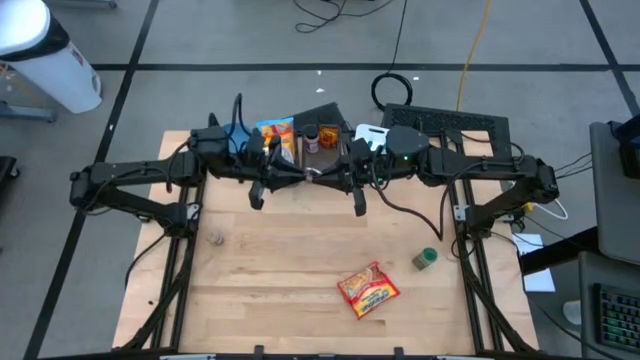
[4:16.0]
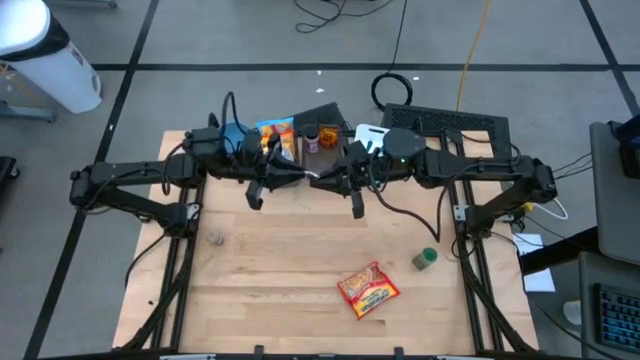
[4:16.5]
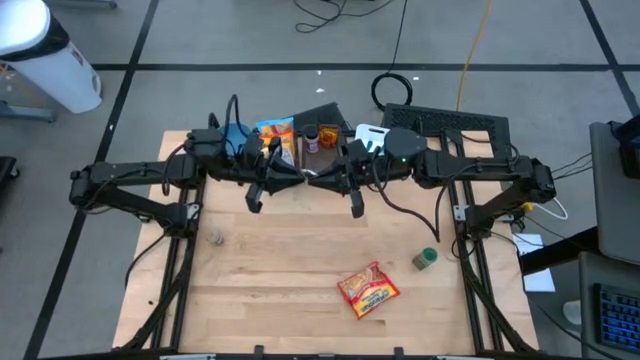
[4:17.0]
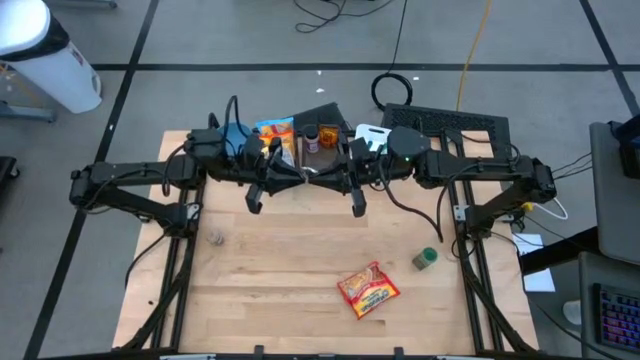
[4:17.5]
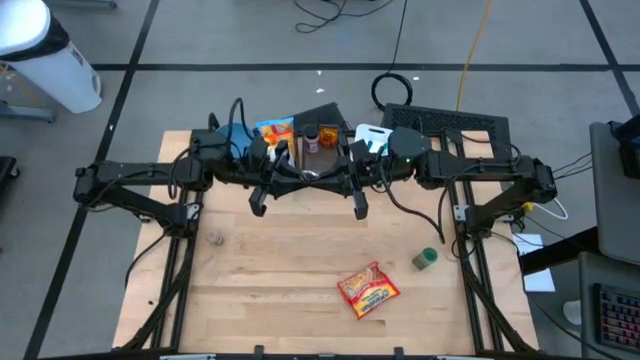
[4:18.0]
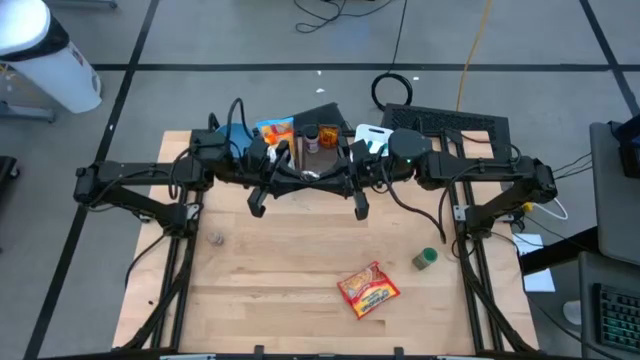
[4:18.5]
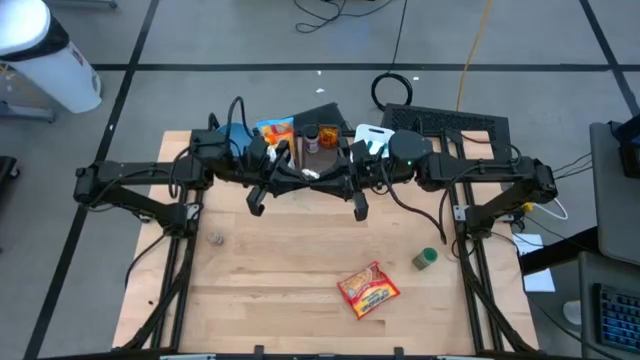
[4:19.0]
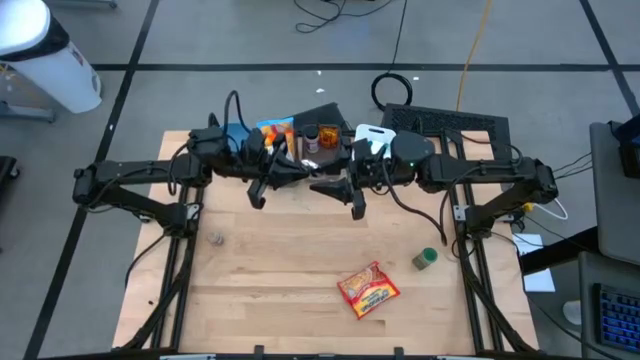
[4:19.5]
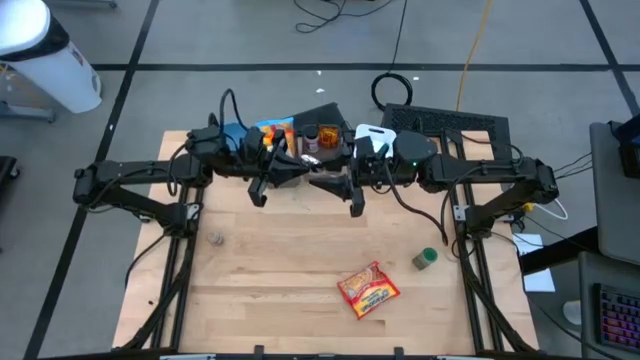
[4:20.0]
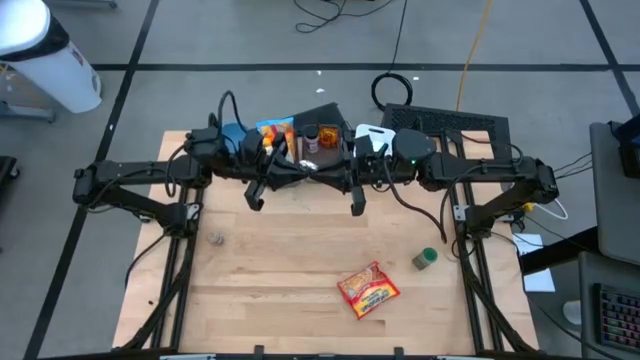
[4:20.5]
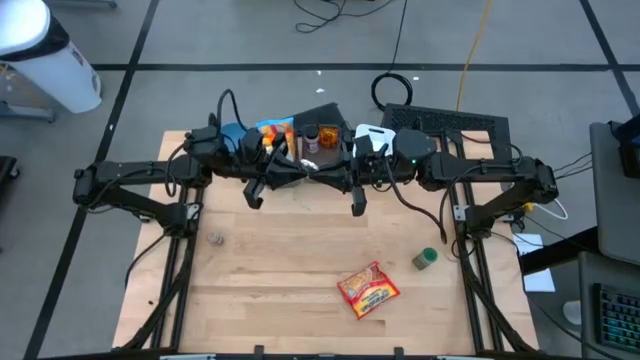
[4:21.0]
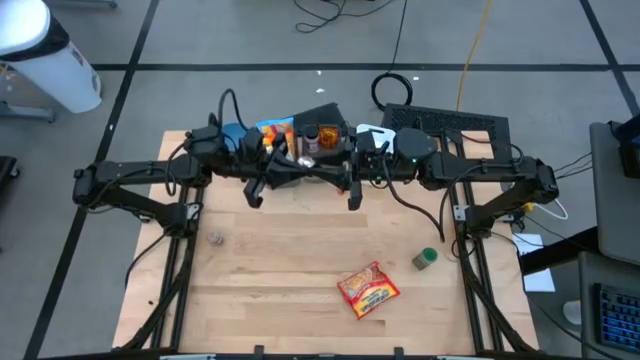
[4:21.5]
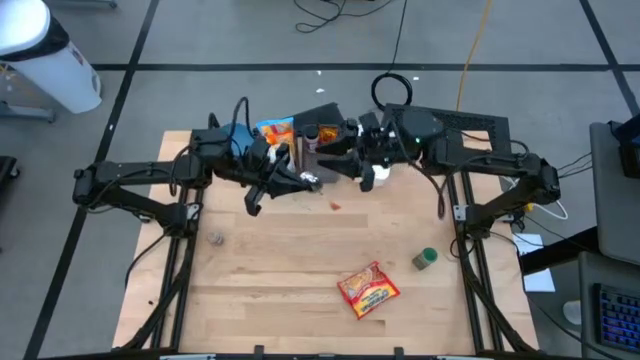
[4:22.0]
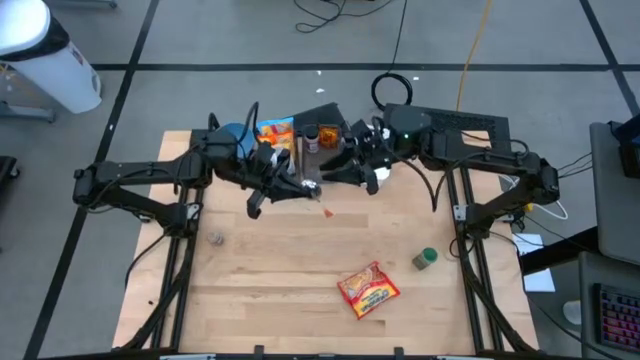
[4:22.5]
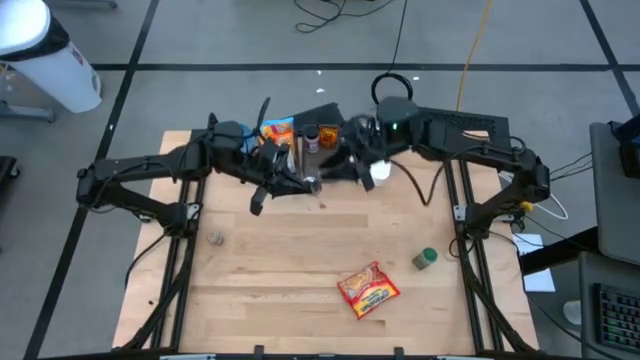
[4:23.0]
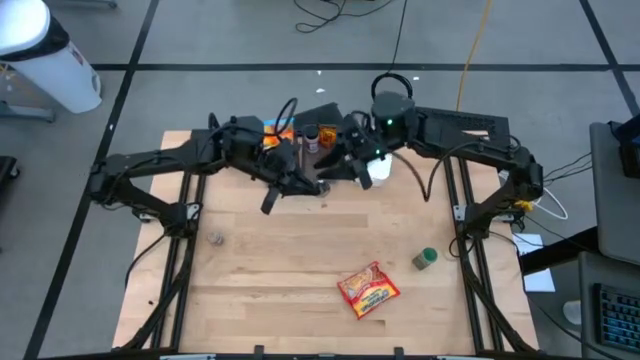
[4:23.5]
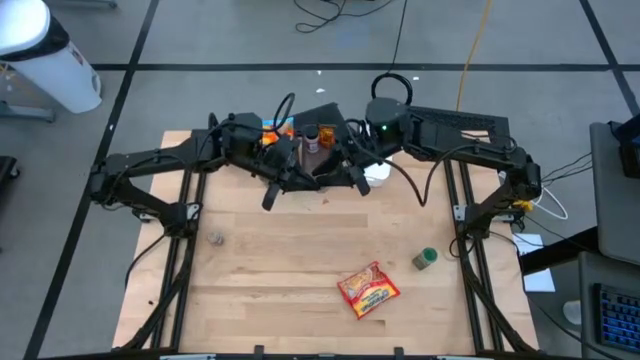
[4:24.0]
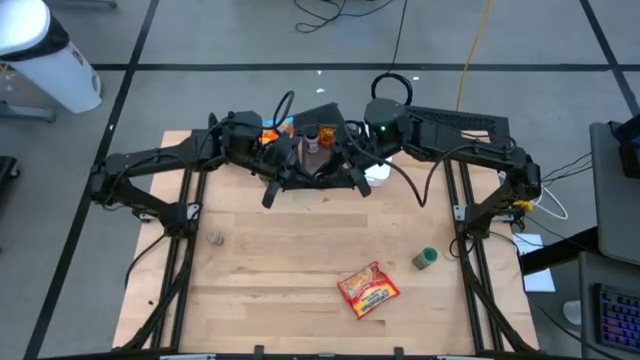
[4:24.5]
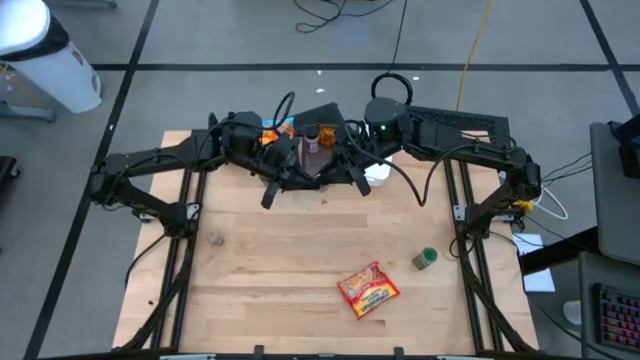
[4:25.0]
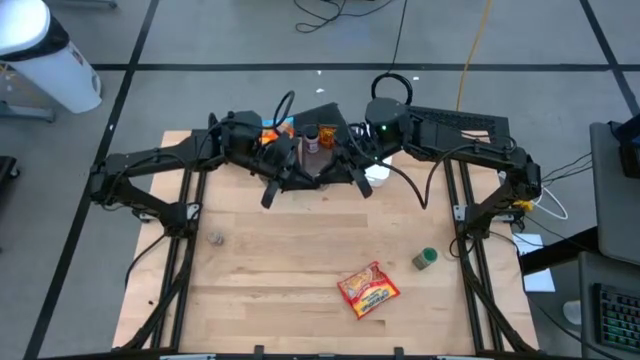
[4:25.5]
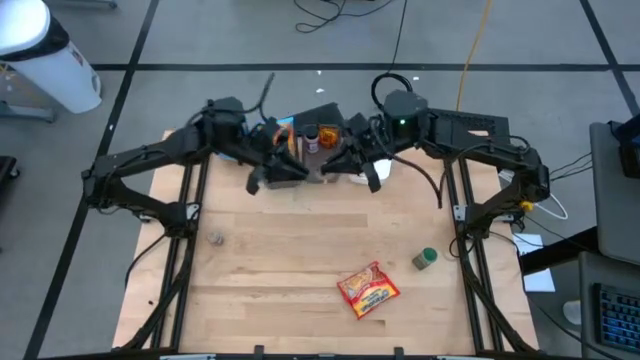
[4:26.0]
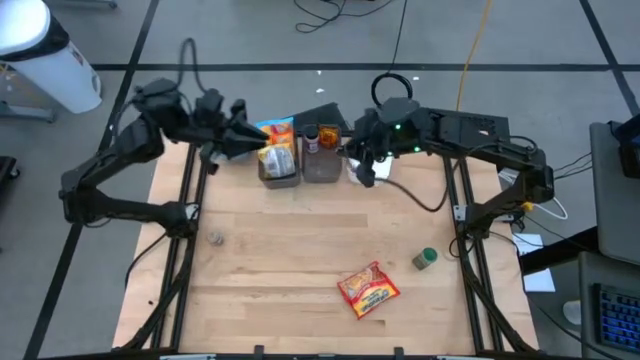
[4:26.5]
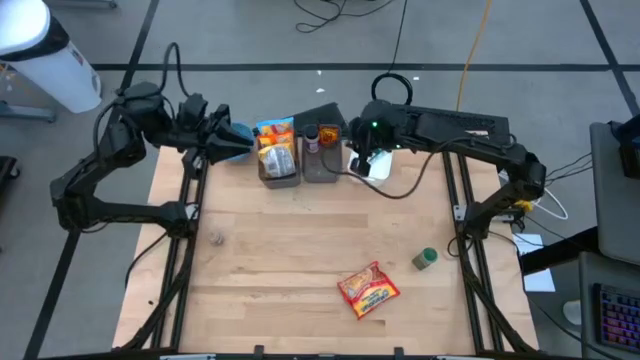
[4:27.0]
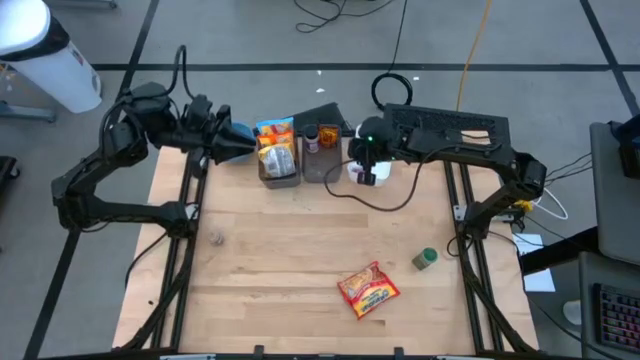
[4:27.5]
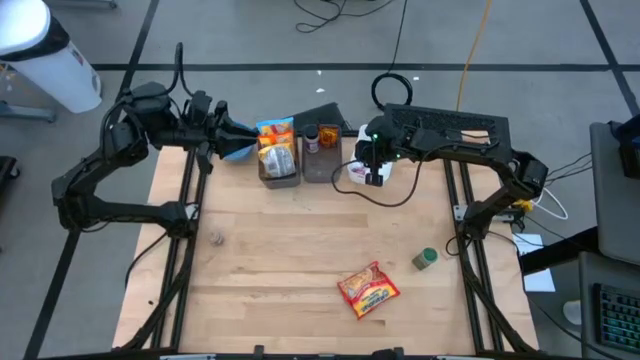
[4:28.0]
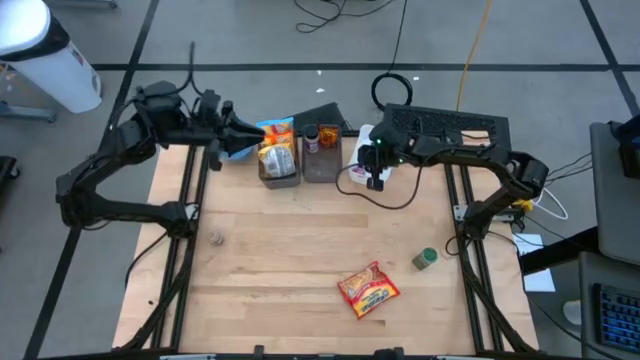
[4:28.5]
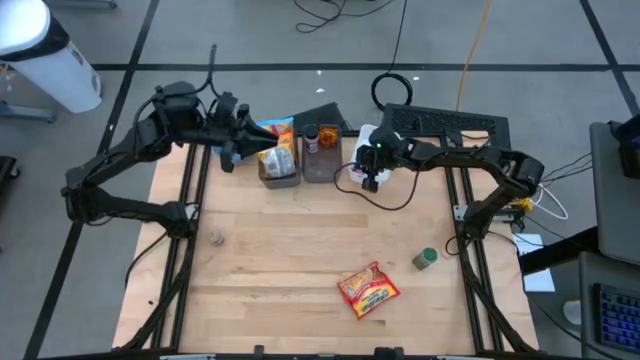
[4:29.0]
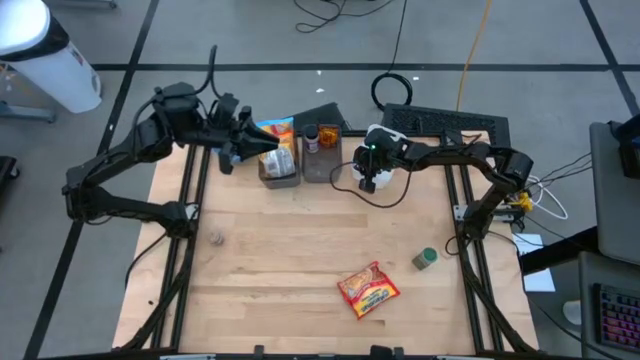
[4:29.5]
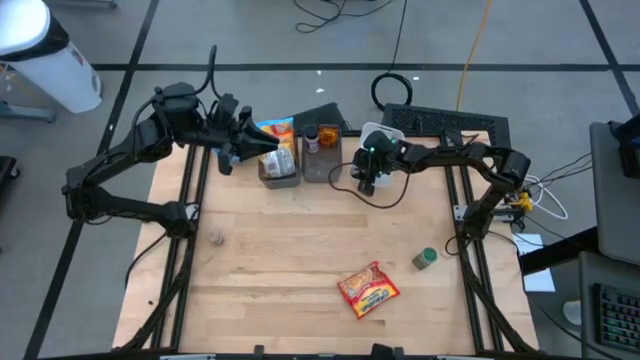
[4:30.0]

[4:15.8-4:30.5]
Task: Pick & Place Food Item
Put the orange spoon into the white bin

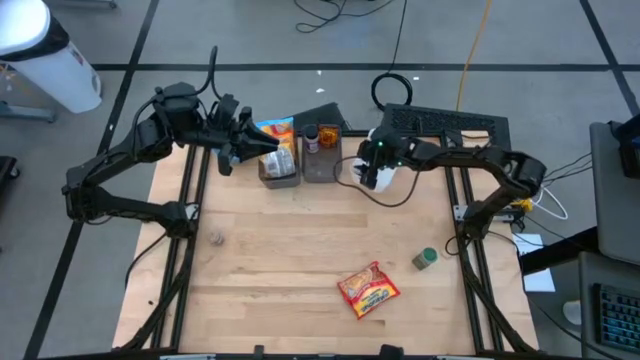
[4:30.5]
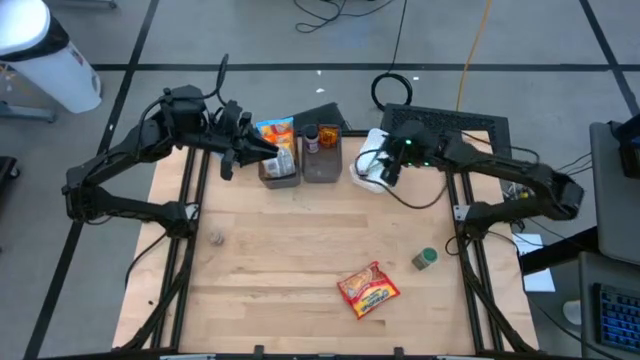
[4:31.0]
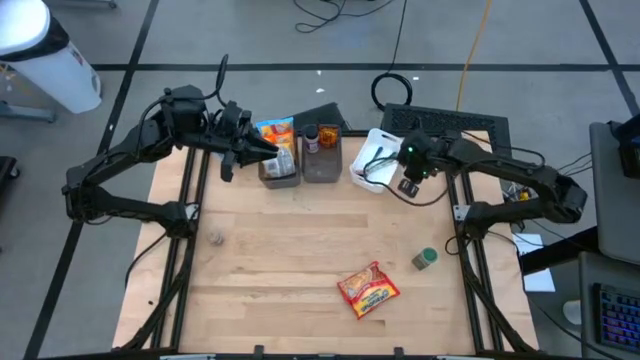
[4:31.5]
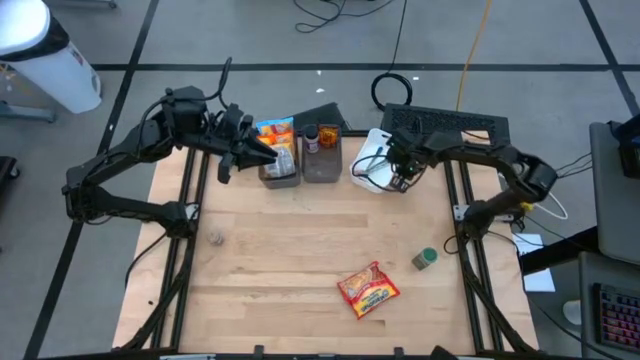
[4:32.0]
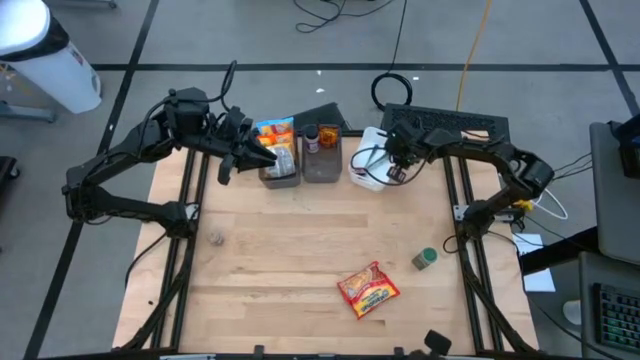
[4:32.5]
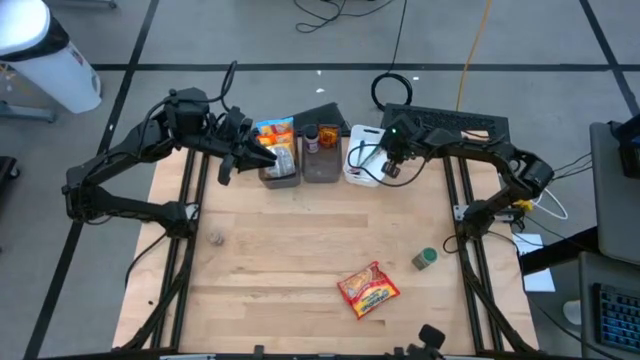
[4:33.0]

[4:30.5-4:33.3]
Adjust the white bin

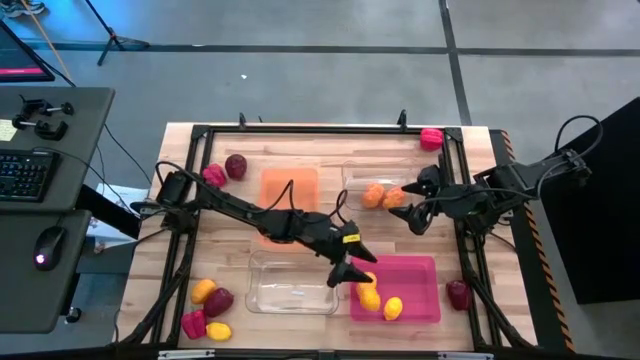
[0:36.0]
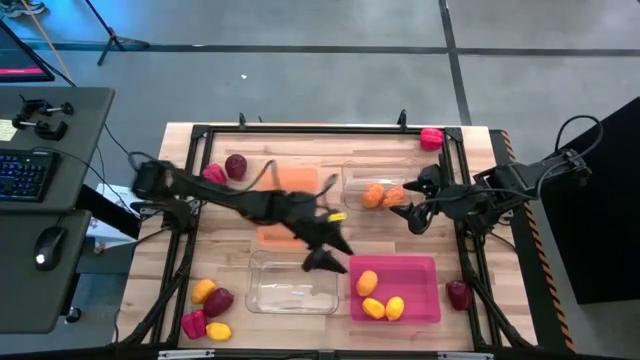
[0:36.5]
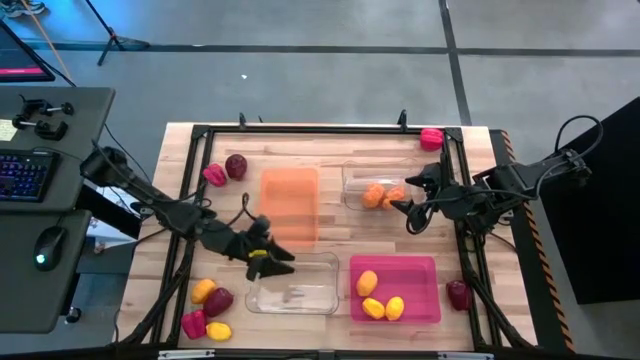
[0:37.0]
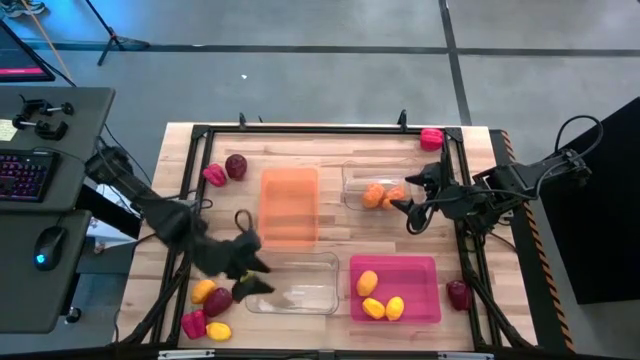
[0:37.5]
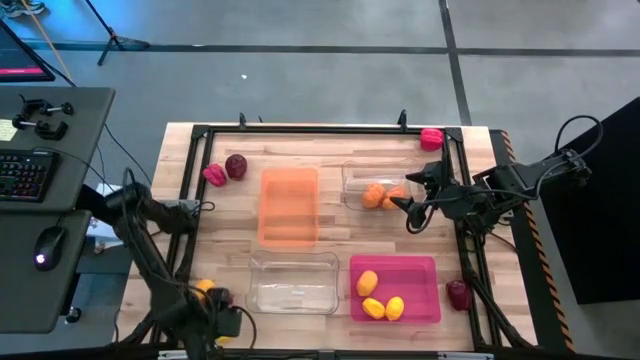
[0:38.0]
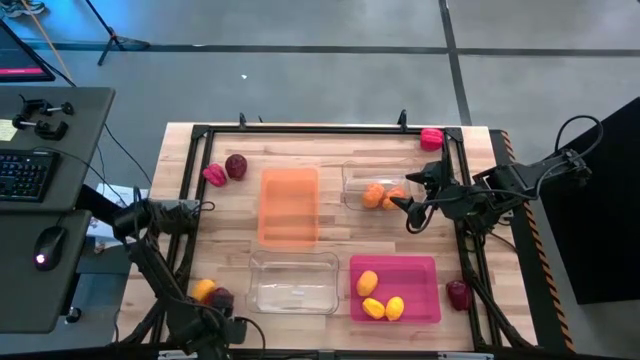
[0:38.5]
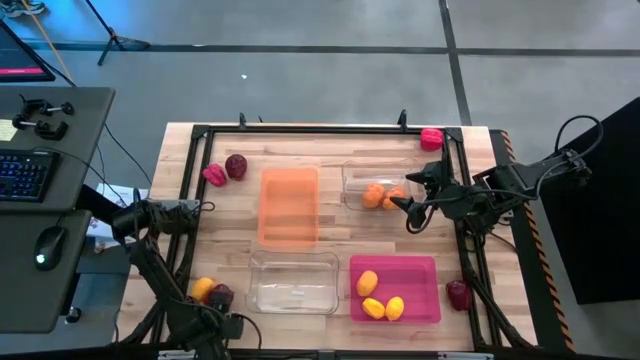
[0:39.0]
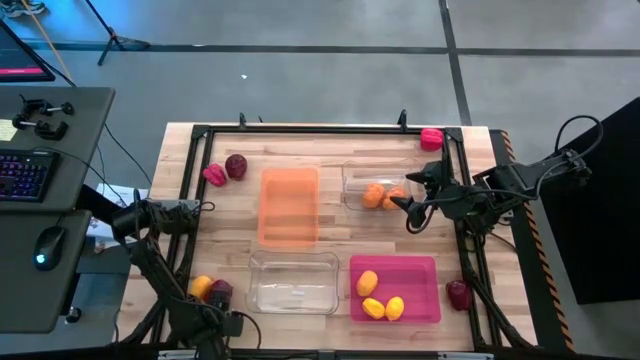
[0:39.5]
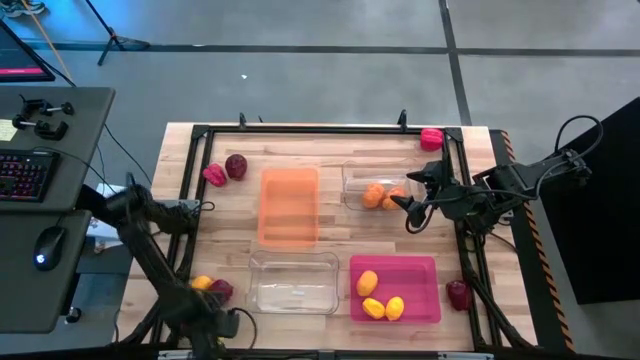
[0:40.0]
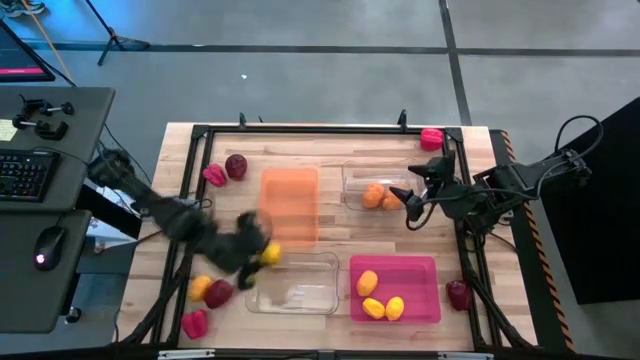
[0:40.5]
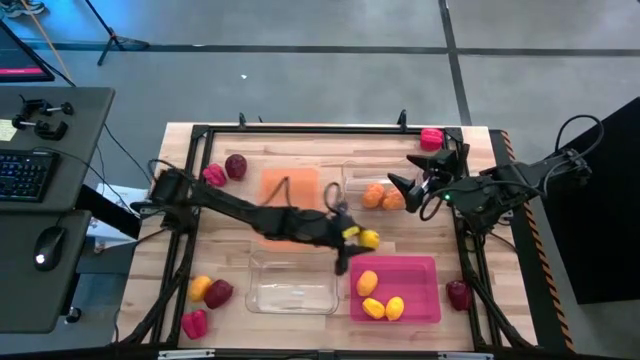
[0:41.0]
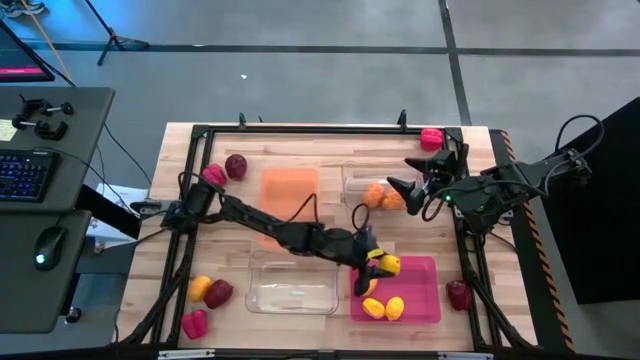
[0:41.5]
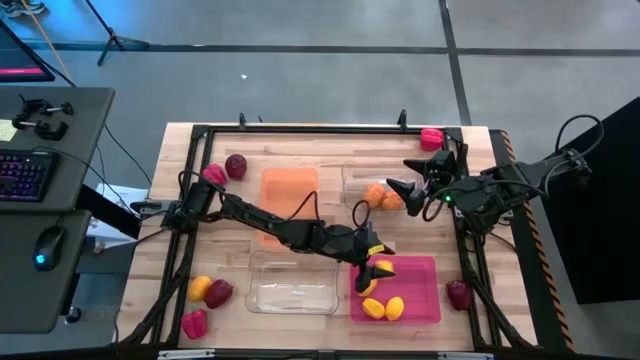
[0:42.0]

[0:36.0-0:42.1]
Task: Sort produce into baskets
Put the bottom lemon into the pink bin
